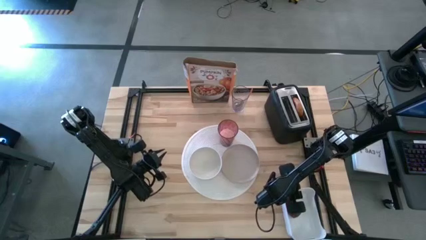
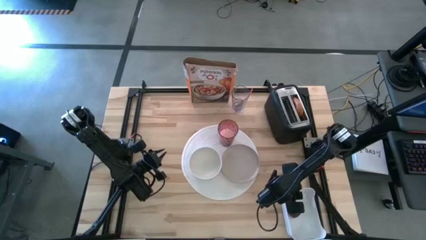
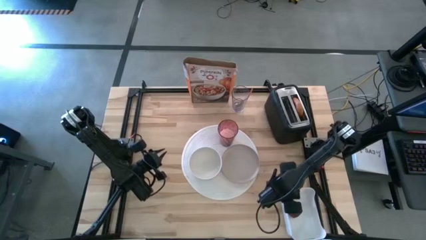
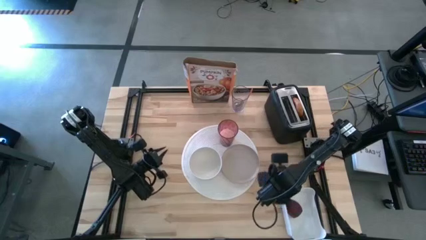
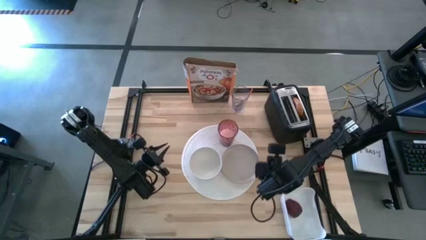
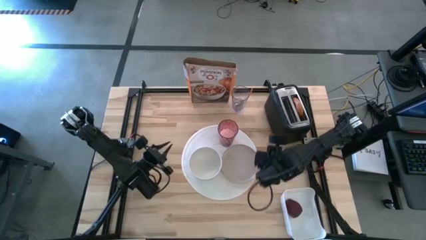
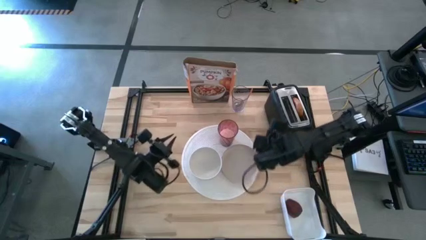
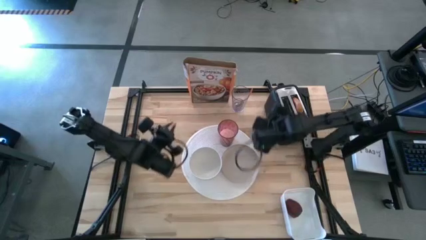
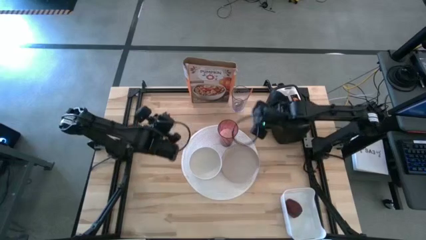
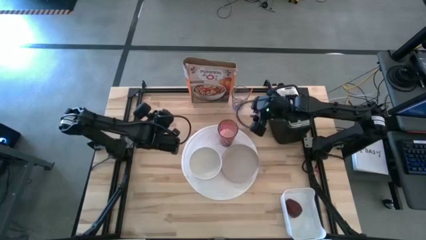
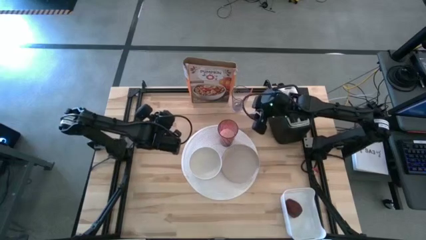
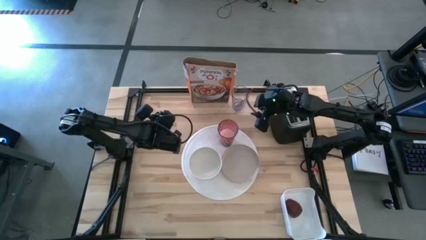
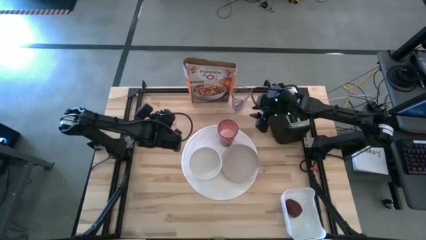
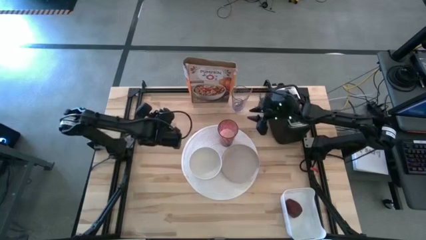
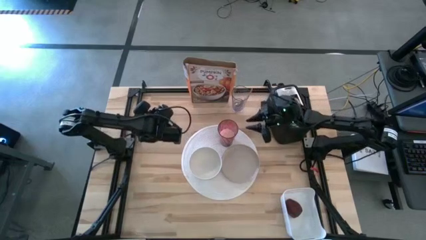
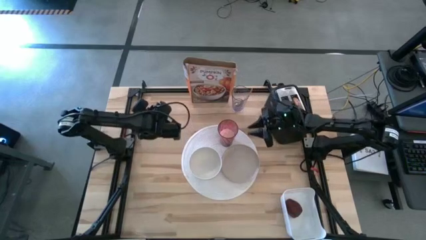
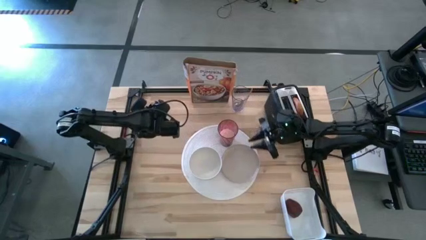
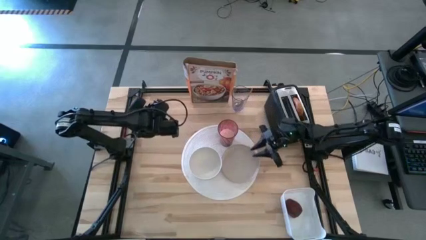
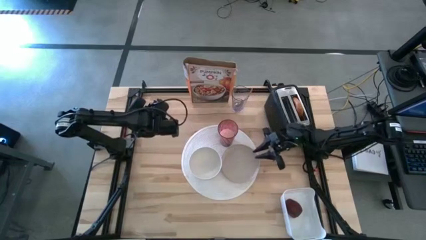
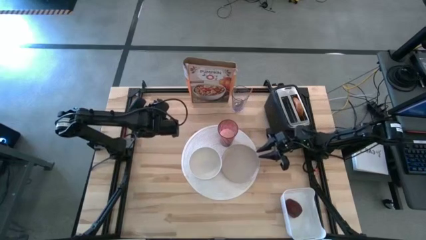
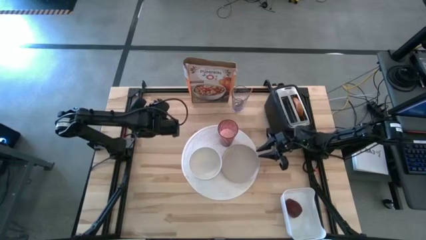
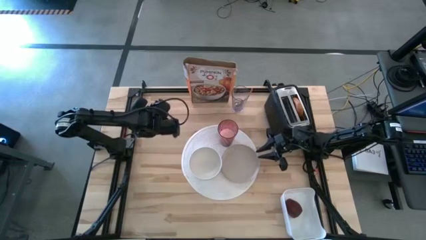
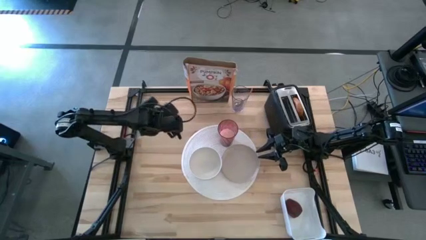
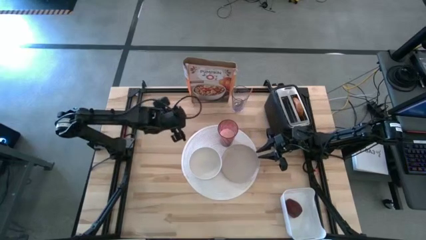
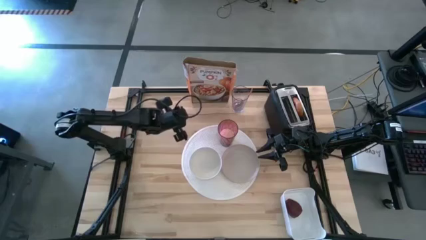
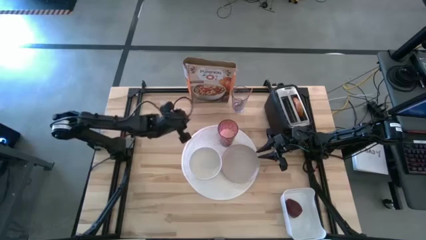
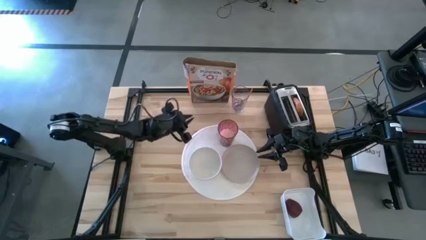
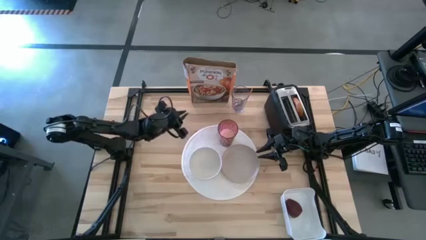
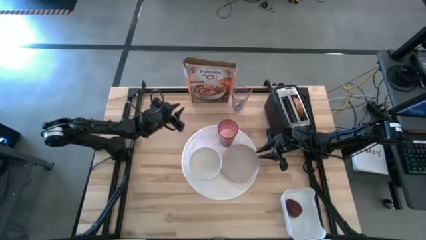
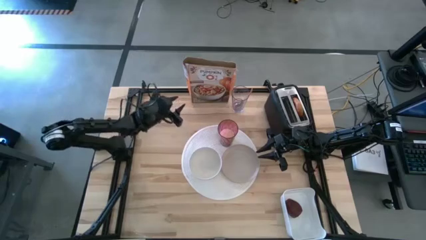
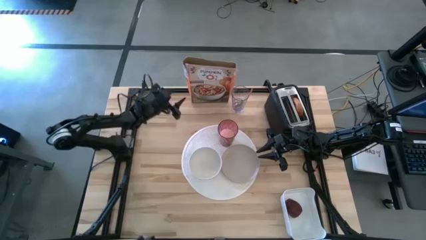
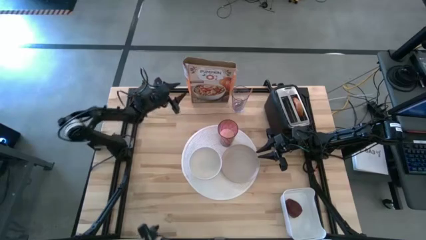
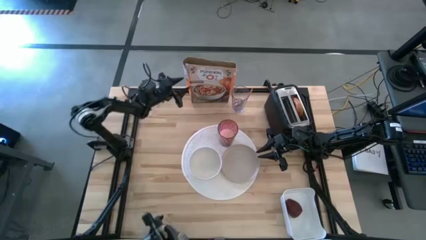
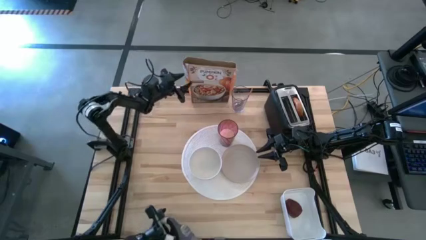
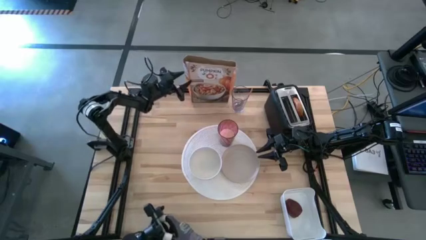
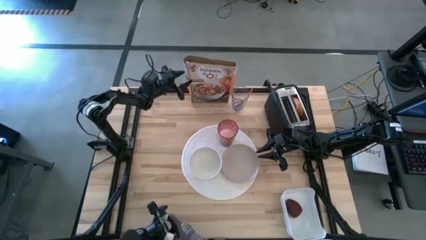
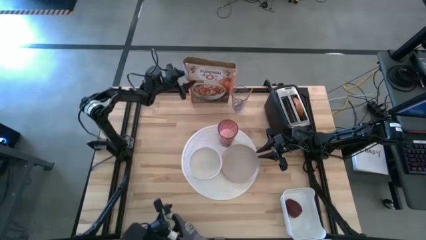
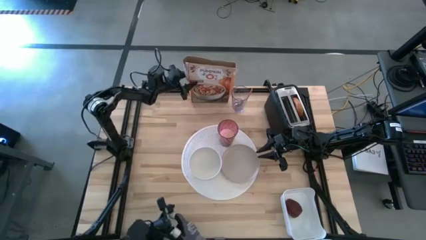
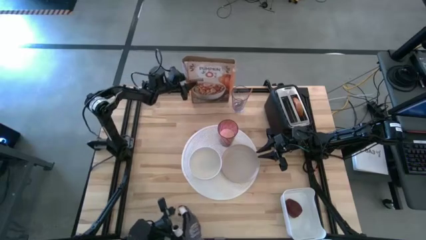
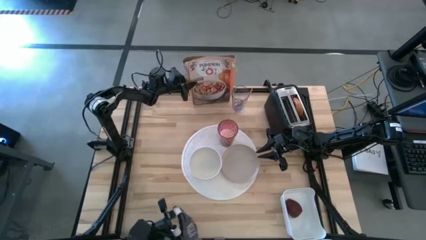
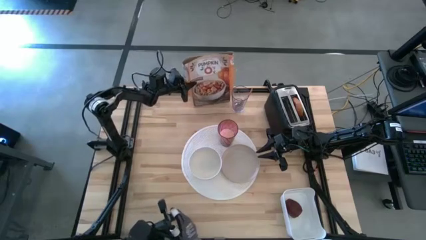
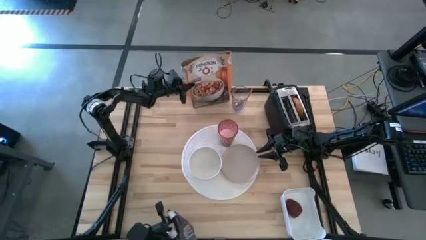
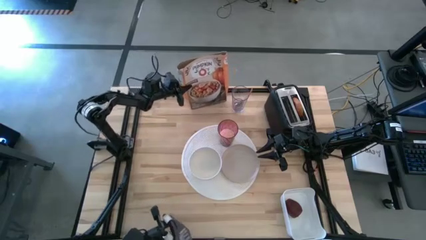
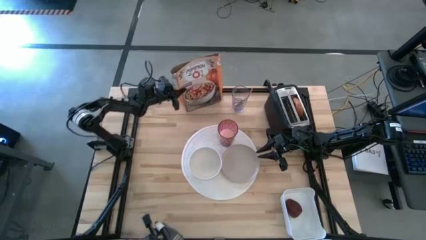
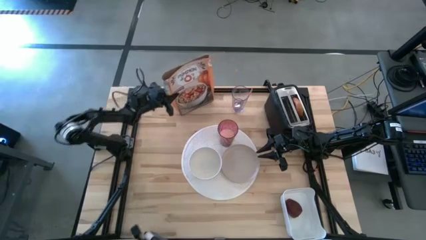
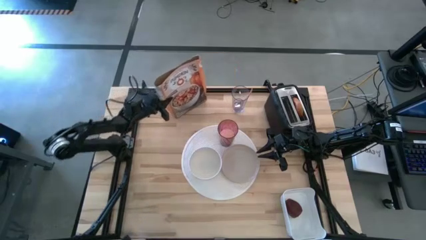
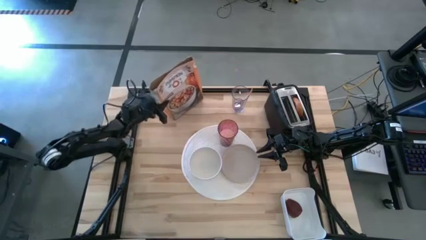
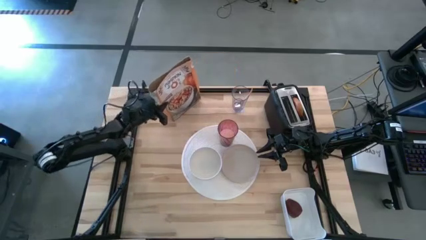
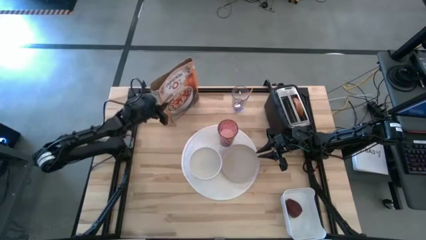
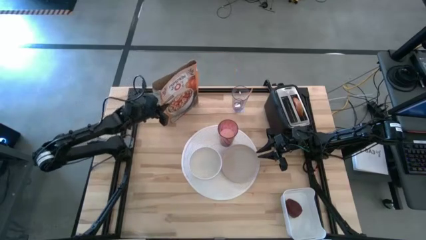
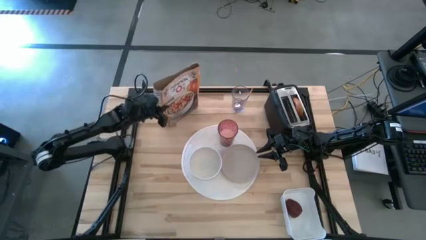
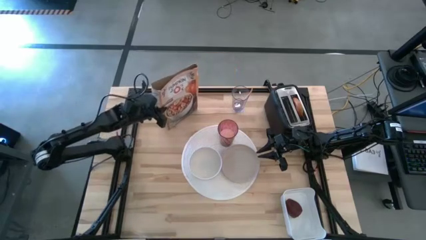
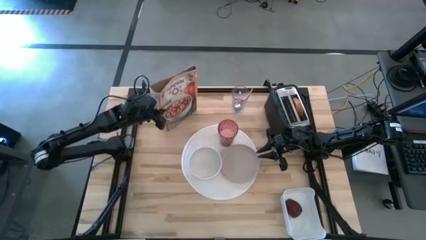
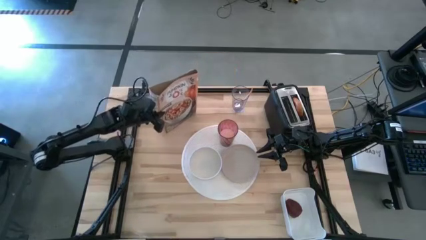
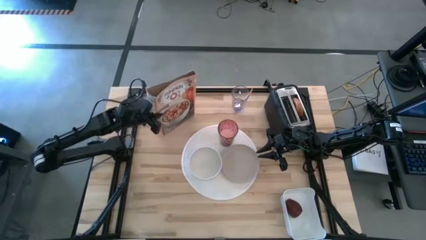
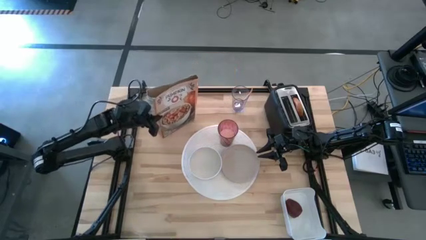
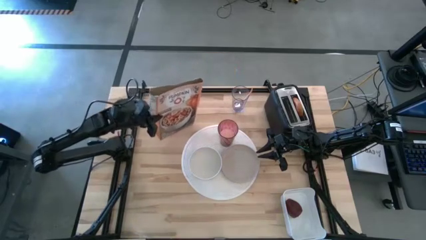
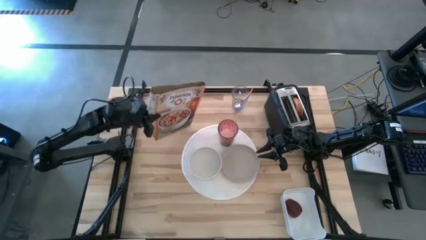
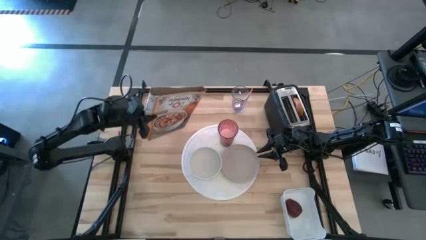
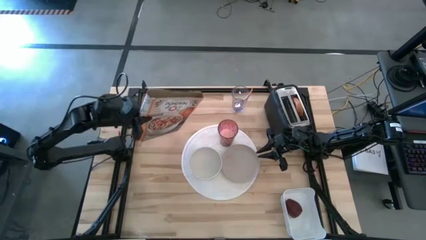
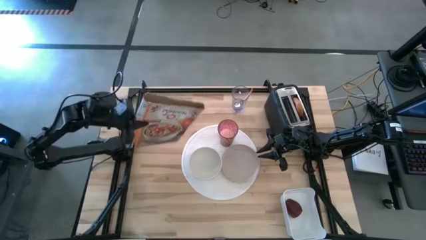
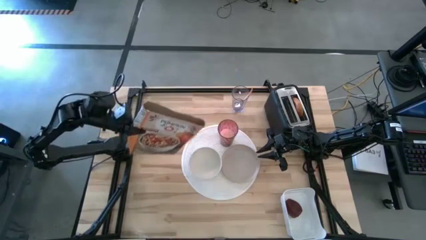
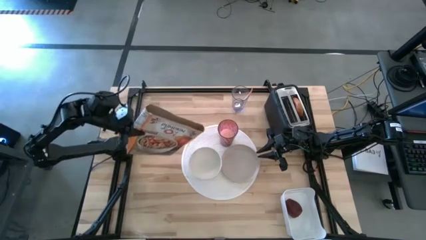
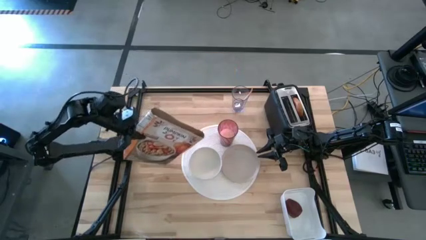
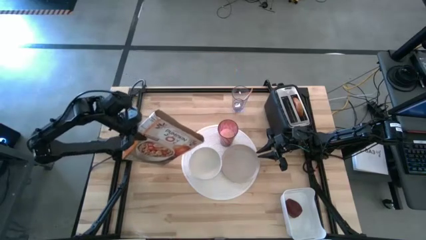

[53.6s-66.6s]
Task: Arrange a breakfast setting
Pour the cereal from the cereal box into the white bowl

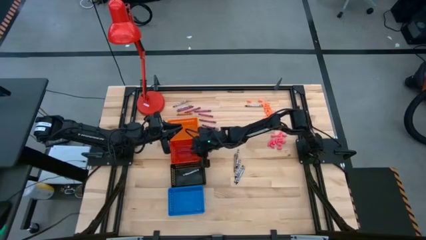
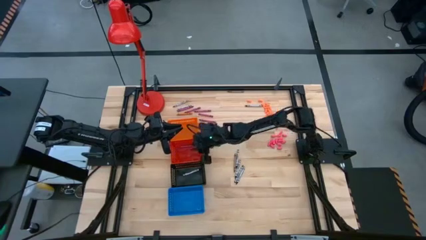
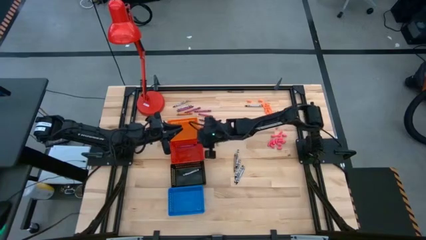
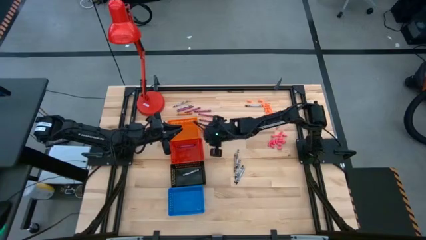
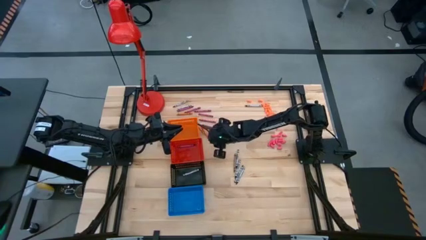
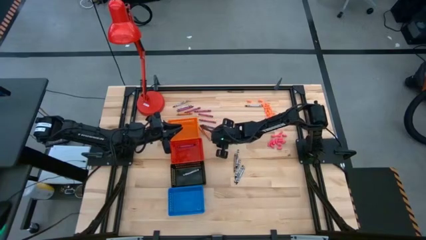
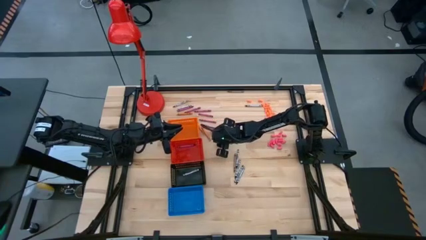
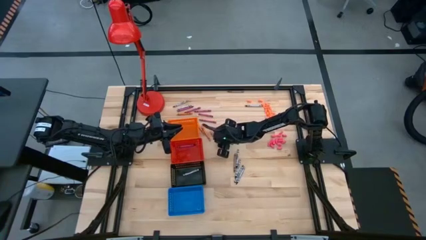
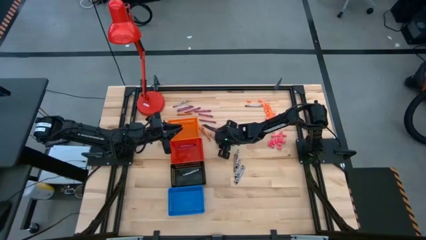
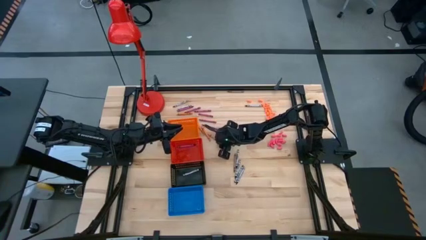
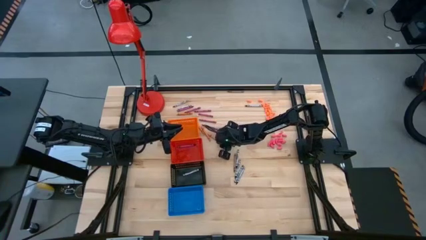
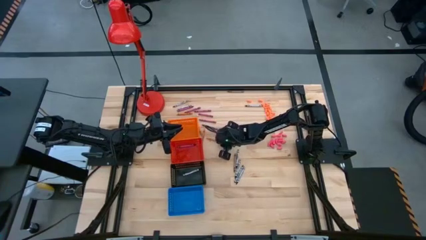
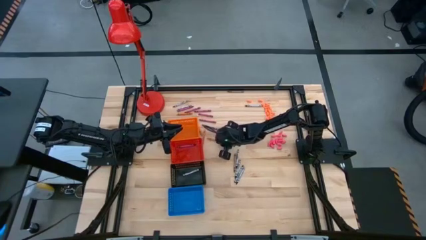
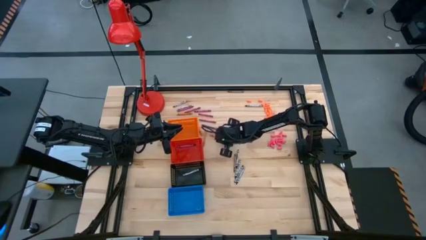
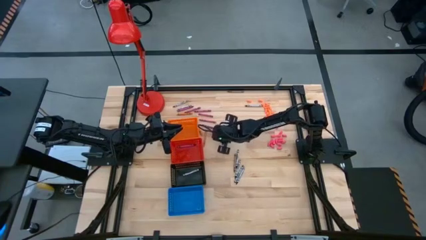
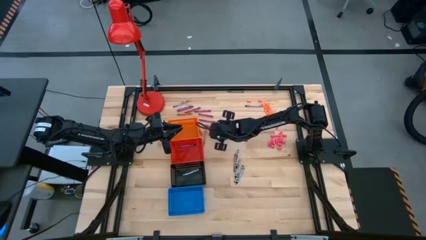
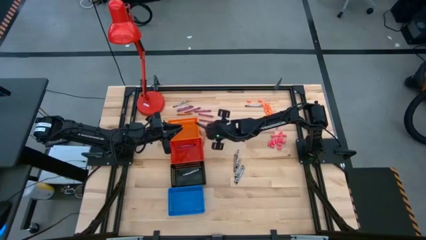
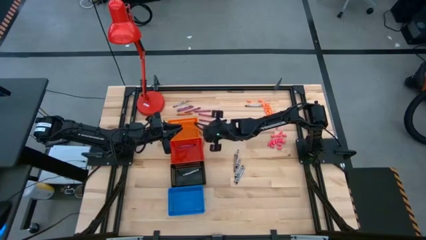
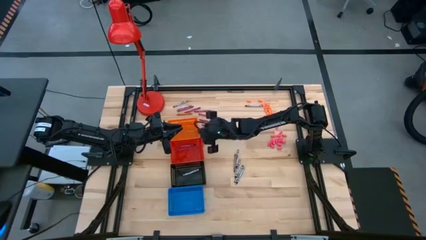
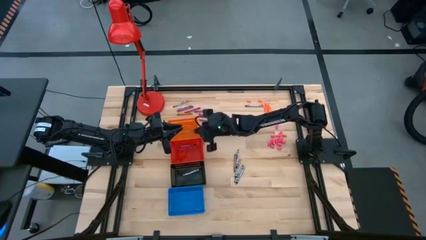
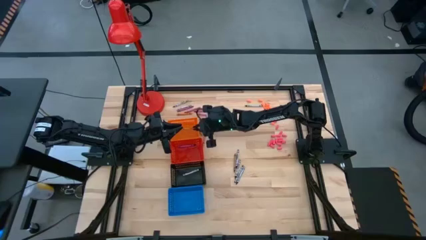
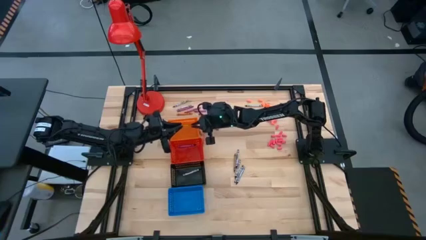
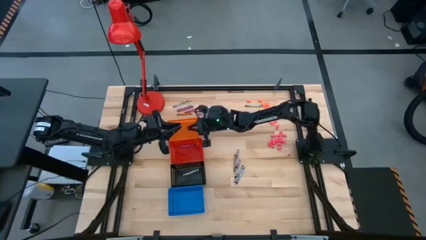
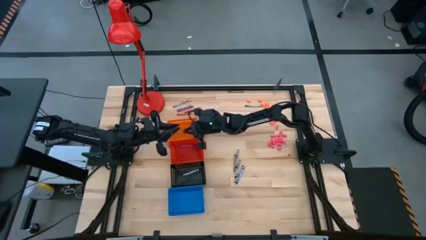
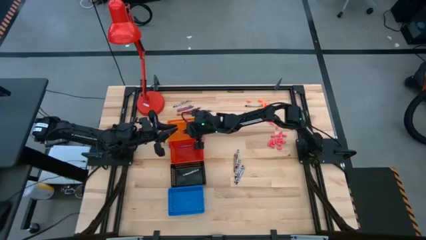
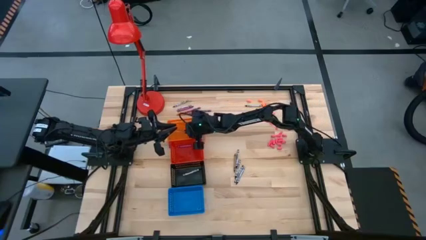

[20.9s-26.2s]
Task: Sort crayons
Put the orange crayon into the orange basket
